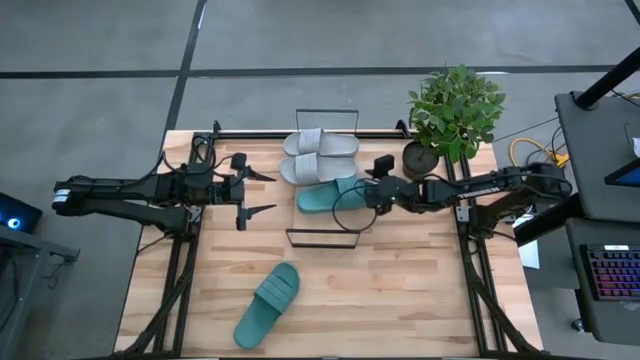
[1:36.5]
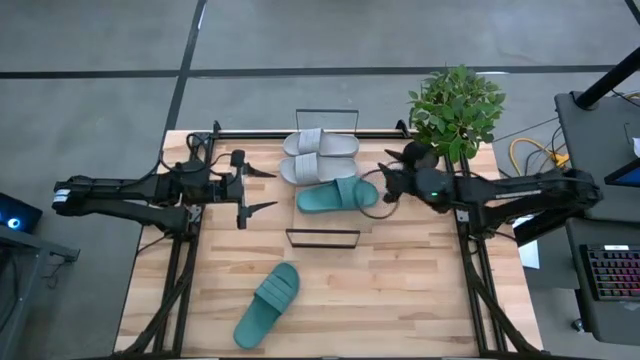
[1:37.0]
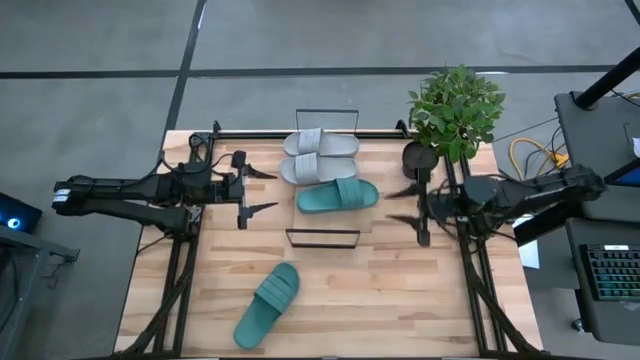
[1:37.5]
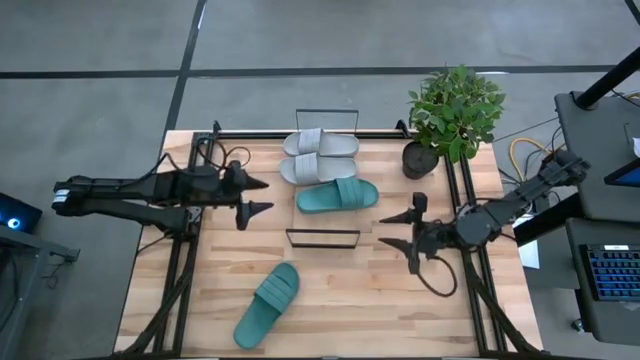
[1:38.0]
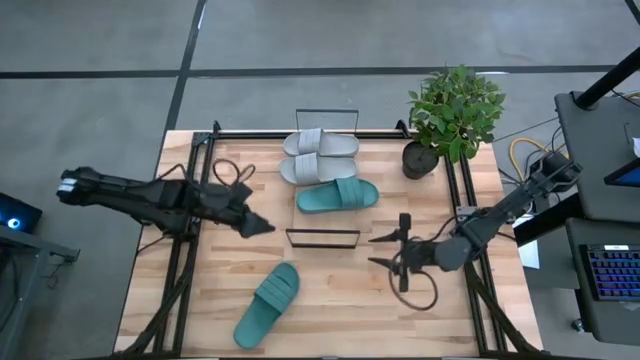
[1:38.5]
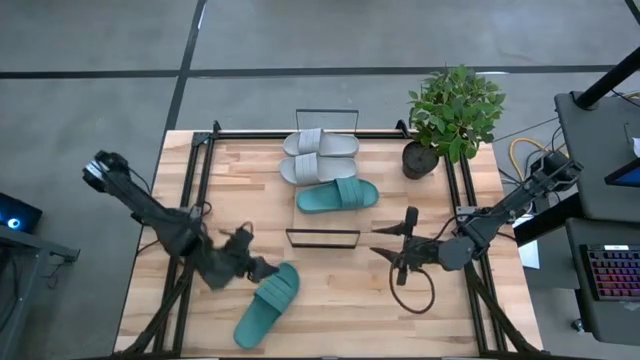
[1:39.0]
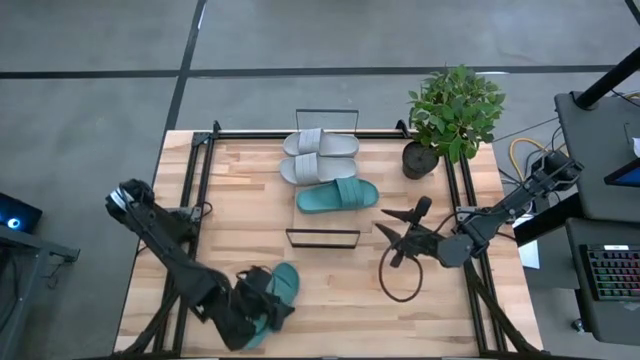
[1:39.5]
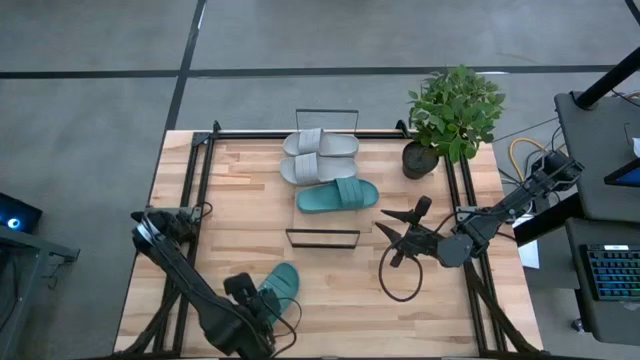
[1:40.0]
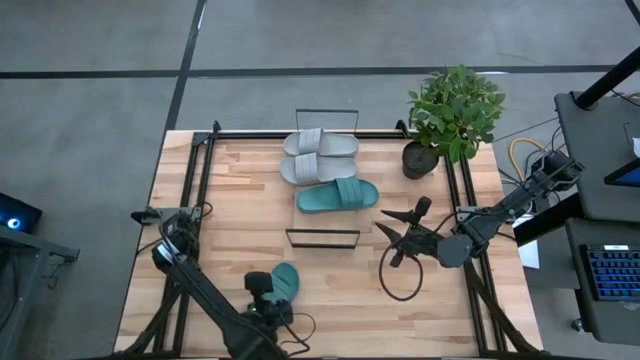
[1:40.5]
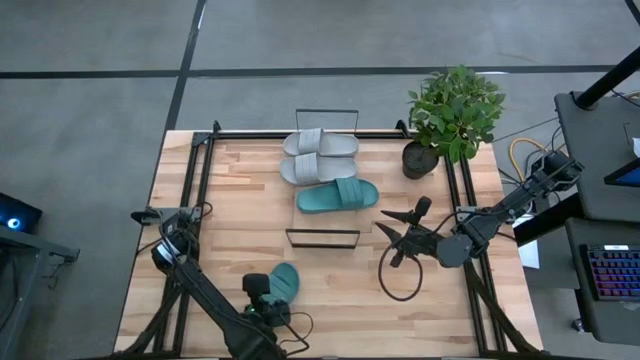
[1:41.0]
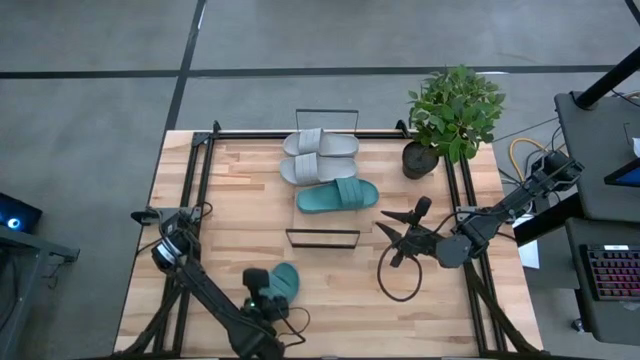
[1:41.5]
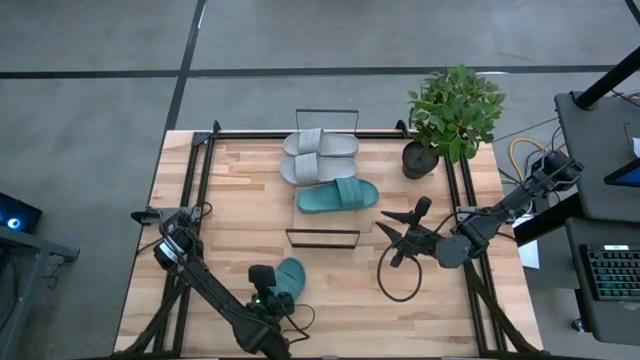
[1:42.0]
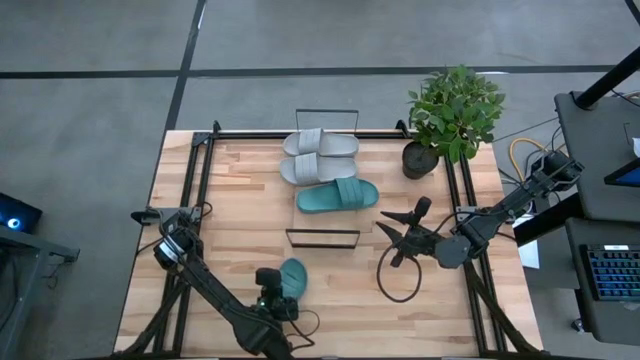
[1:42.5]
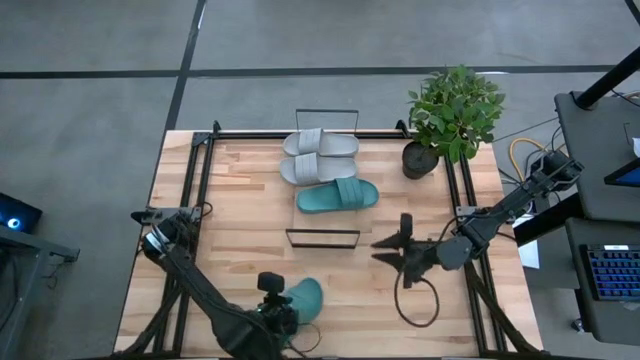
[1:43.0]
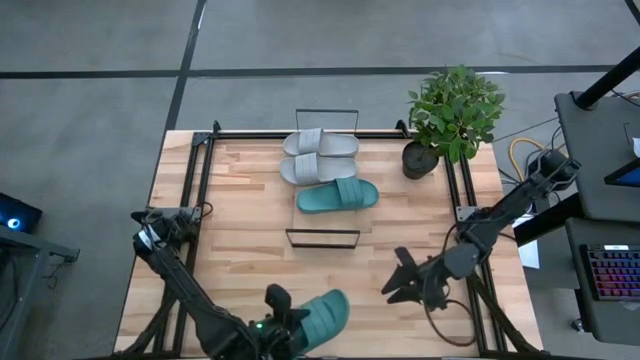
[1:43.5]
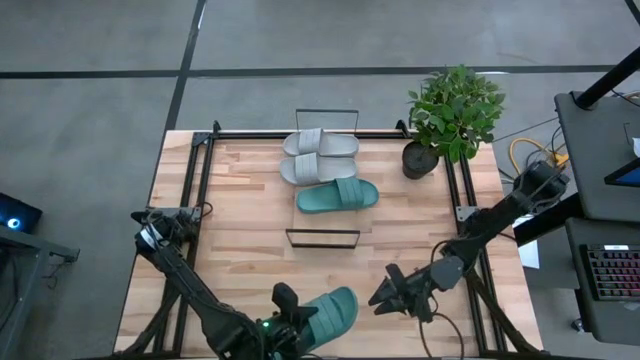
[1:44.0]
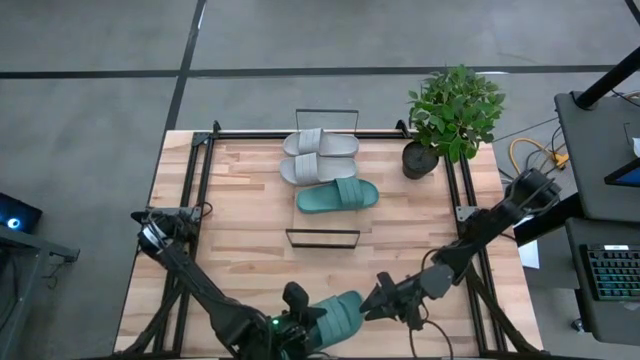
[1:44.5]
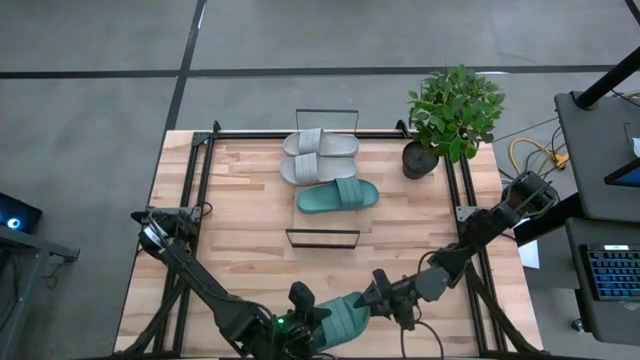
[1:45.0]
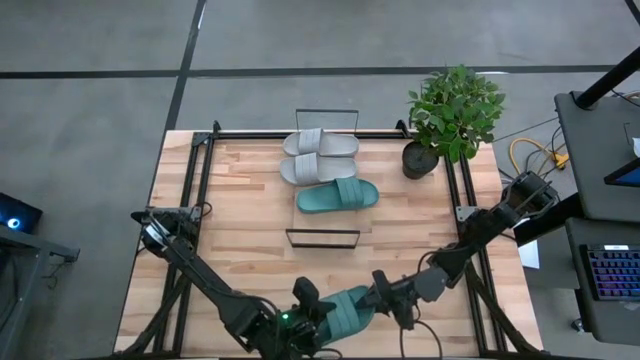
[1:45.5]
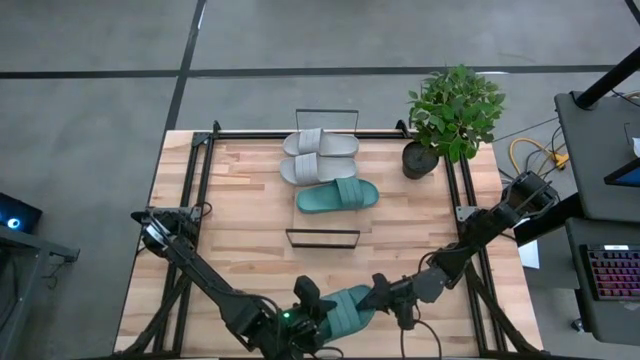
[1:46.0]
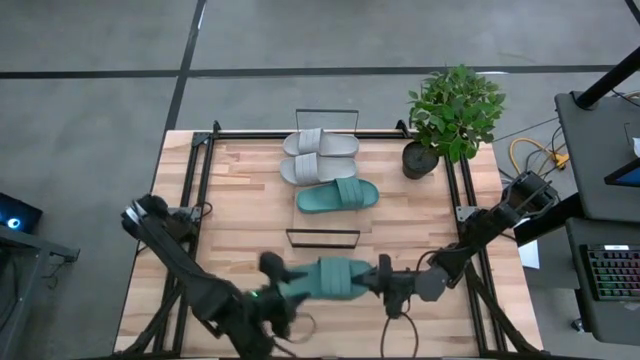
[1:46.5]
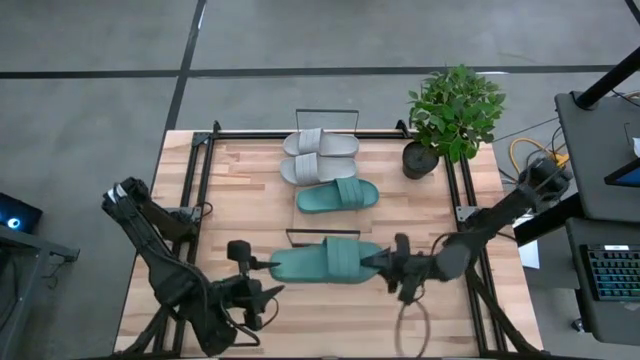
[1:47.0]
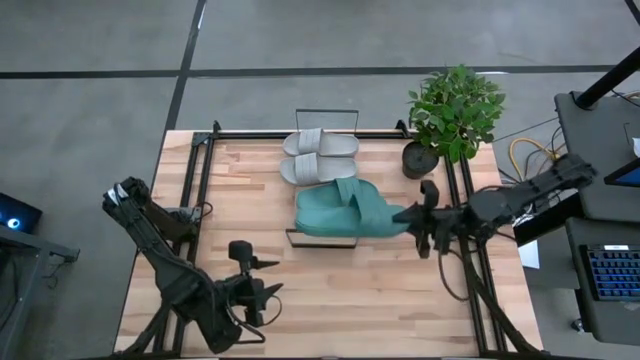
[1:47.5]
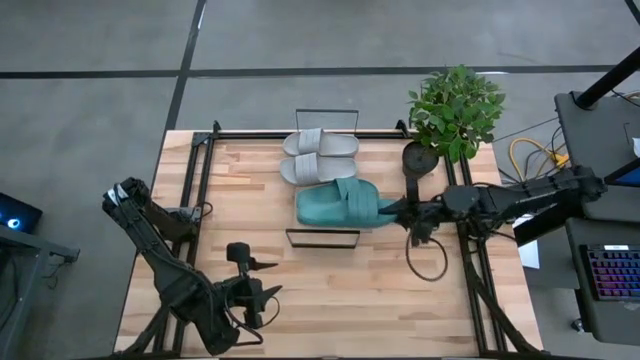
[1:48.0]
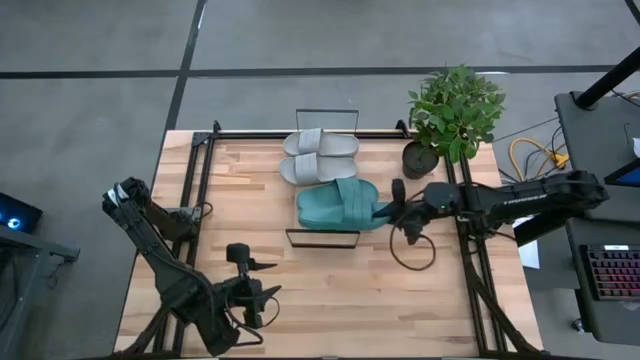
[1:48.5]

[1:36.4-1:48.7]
Task: Pick and place slides into the shelf
Put the green slipper on the shelf

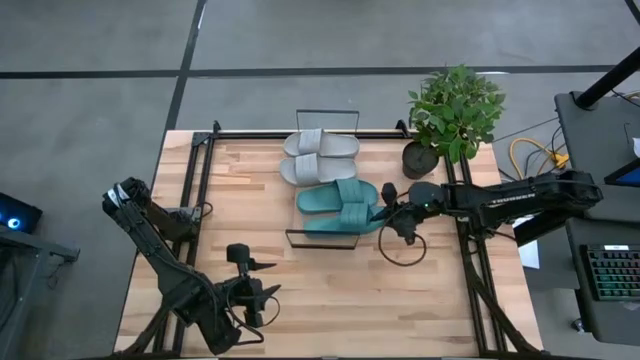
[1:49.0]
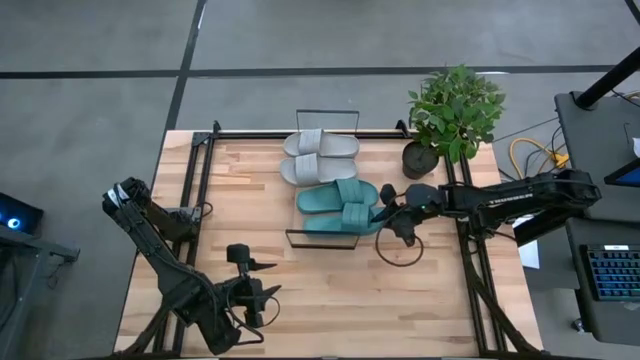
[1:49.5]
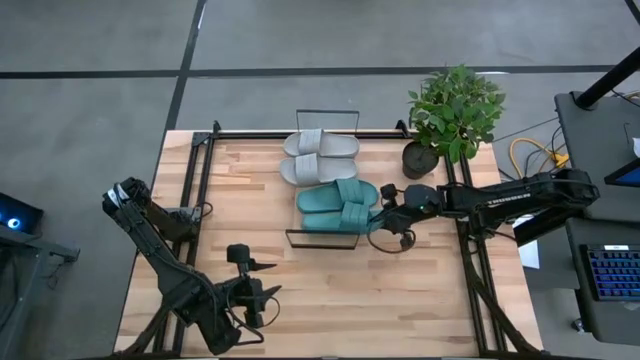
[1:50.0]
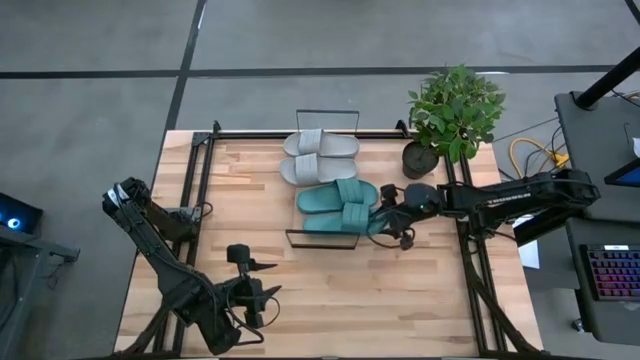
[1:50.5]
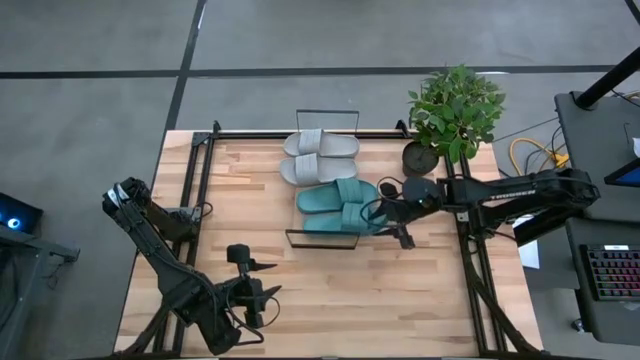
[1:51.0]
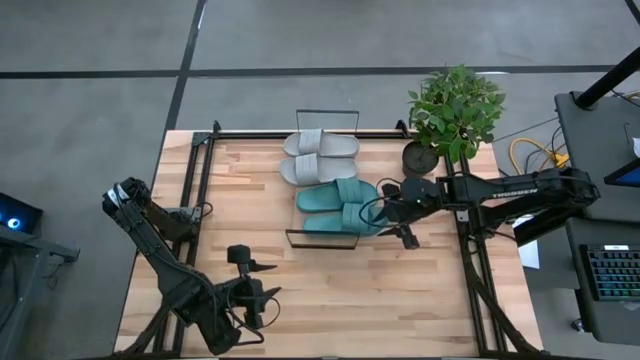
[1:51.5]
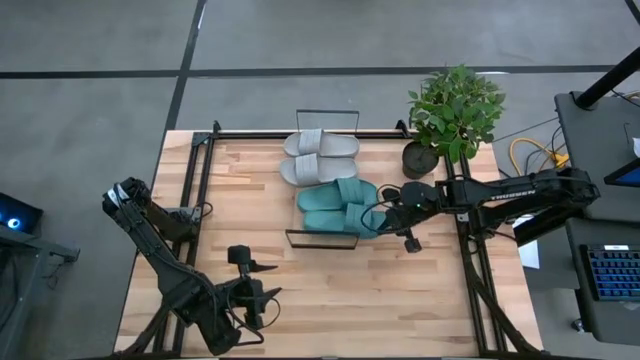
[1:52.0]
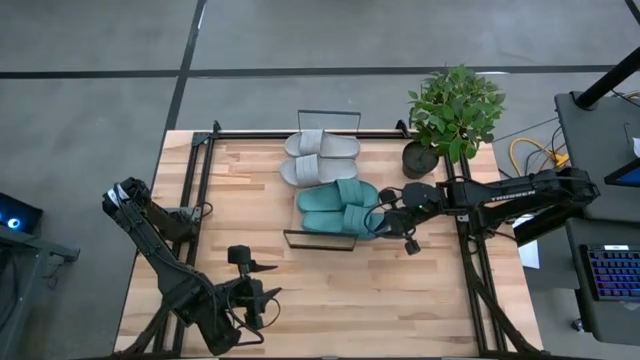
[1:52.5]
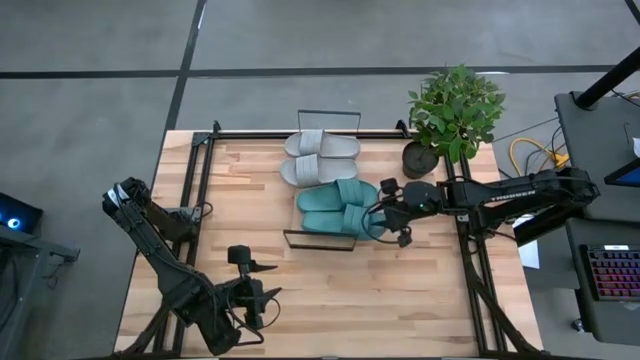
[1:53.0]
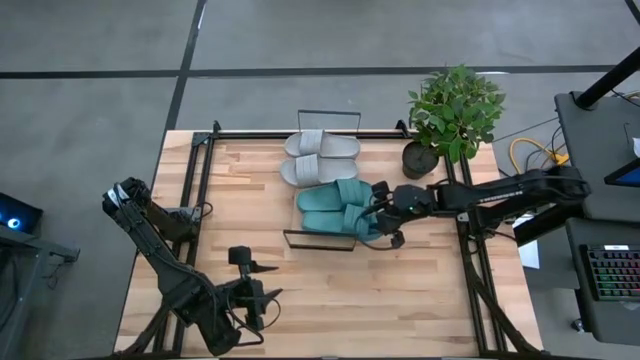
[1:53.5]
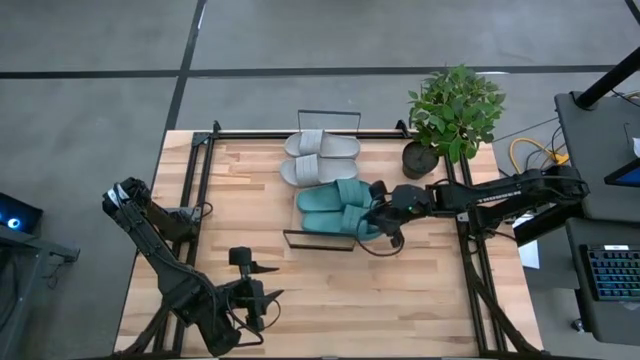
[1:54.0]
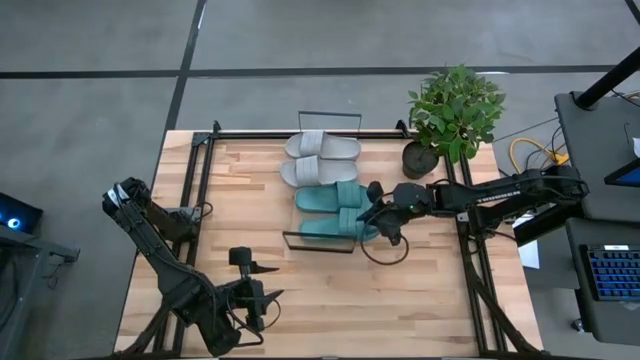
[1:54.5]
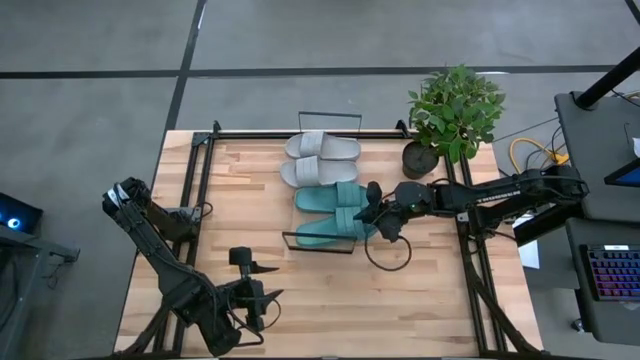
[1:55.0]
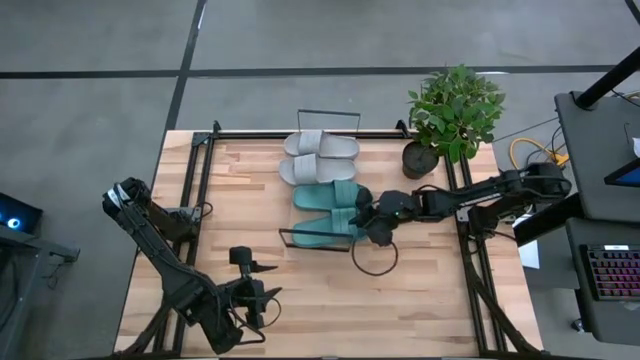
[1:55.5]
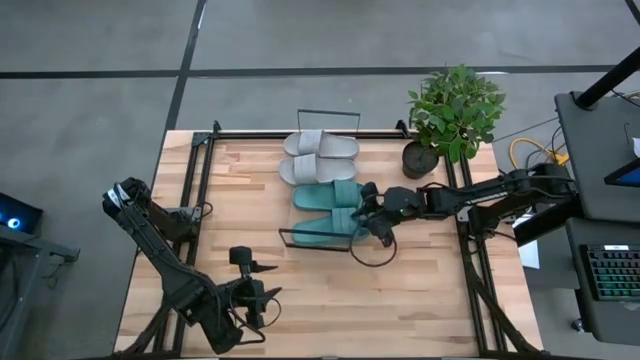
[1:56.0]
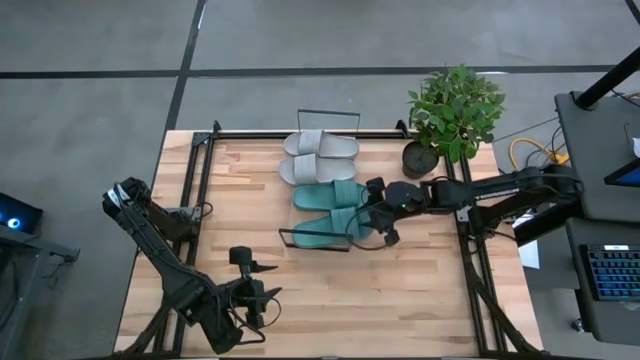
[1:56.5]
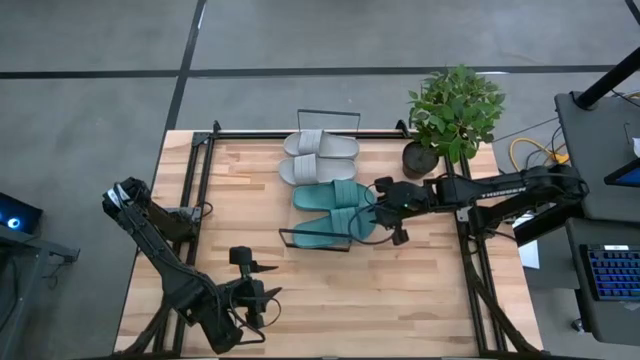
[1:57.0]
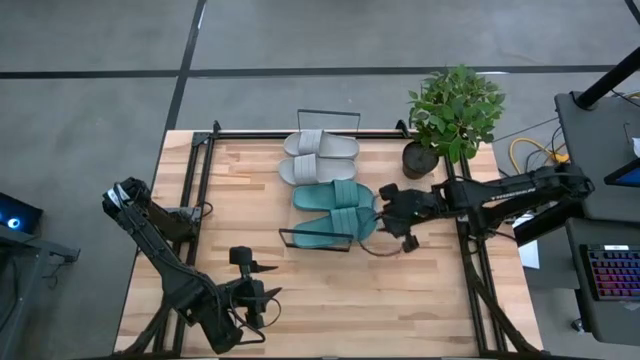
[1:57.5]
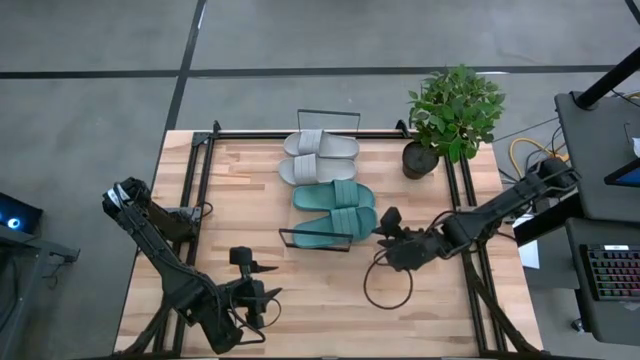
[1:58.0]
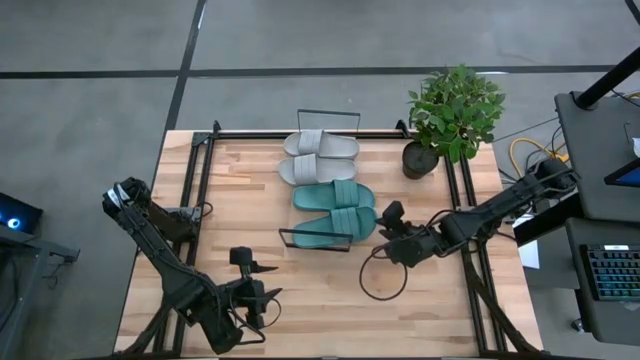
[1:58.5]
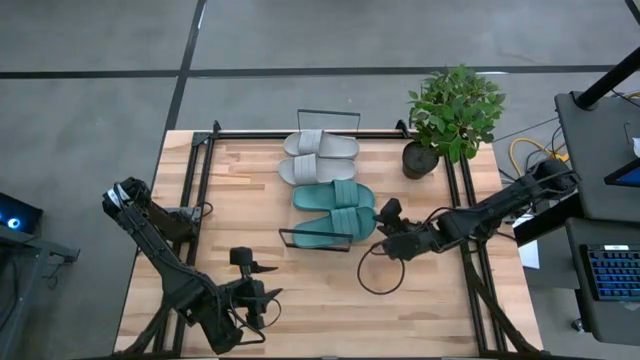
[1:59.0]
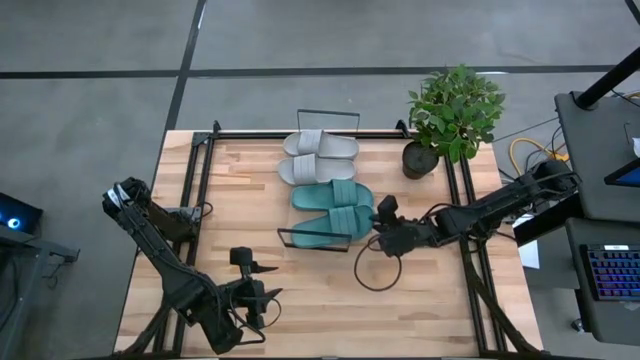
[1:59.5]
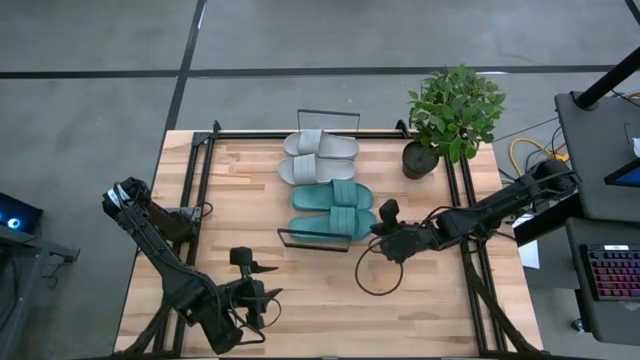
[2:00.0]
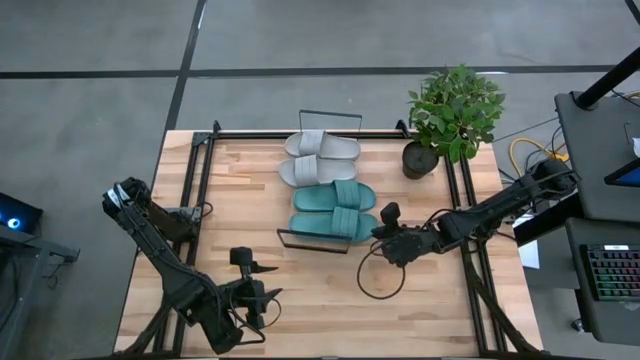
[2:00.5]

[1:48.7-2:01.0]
Put the green slipper on the shelf
